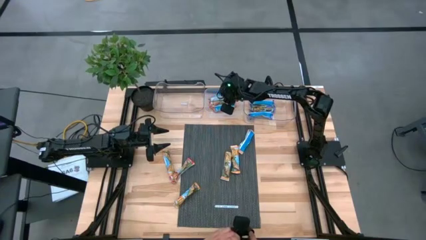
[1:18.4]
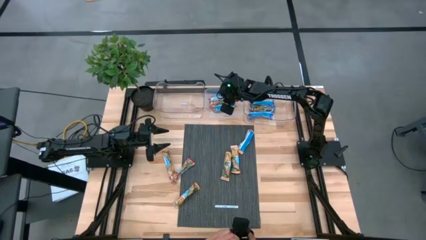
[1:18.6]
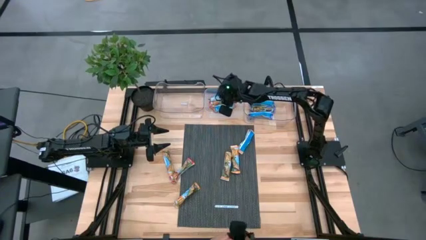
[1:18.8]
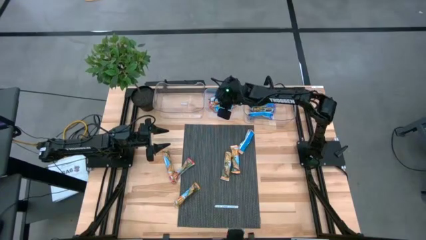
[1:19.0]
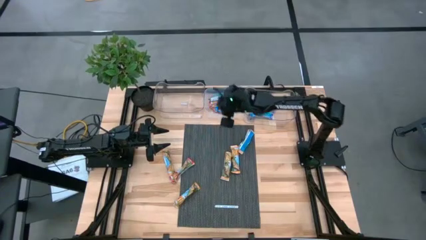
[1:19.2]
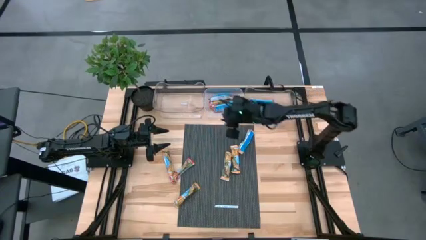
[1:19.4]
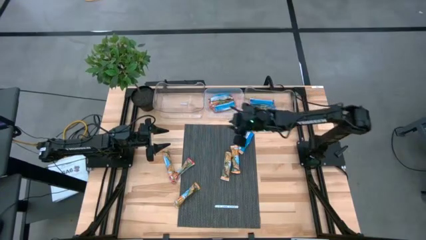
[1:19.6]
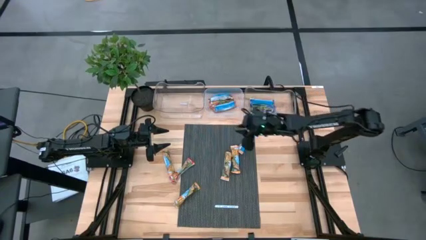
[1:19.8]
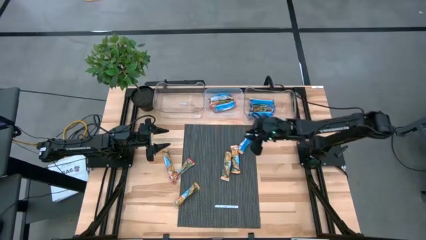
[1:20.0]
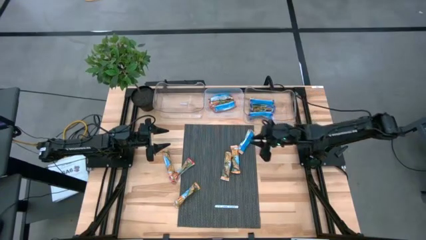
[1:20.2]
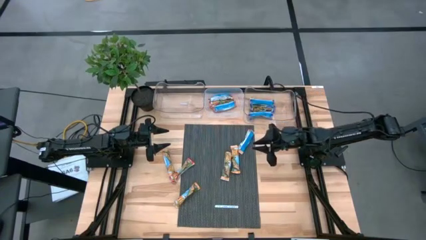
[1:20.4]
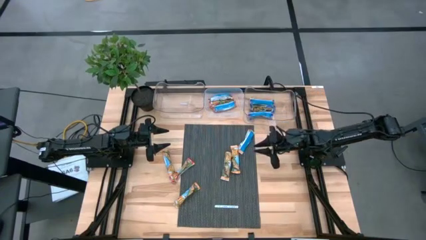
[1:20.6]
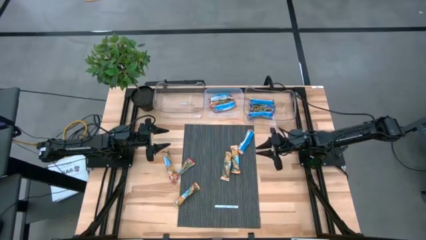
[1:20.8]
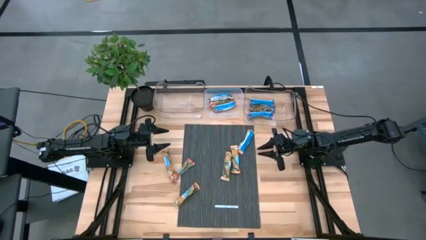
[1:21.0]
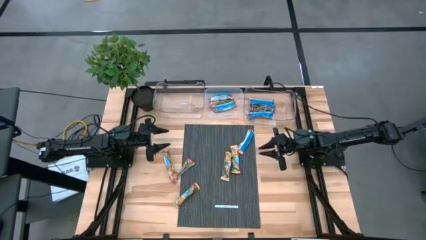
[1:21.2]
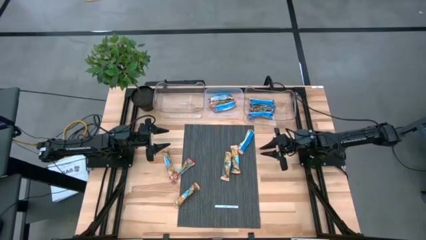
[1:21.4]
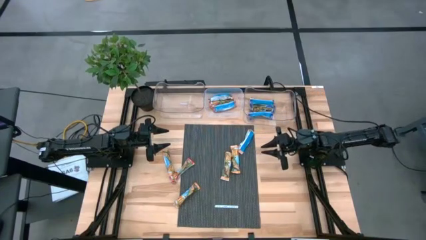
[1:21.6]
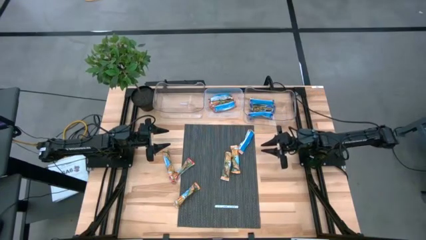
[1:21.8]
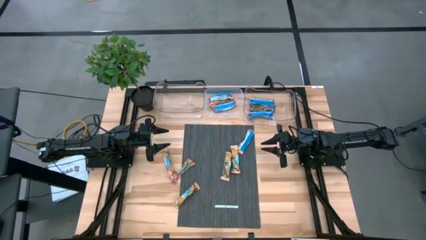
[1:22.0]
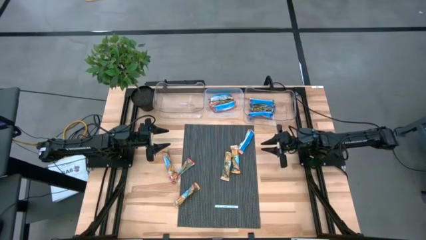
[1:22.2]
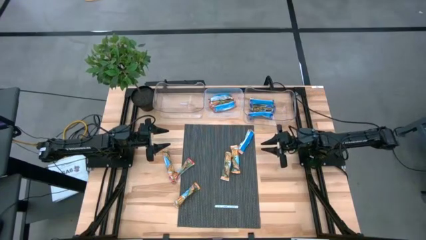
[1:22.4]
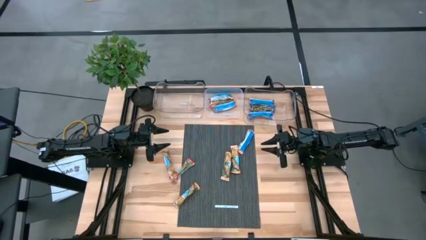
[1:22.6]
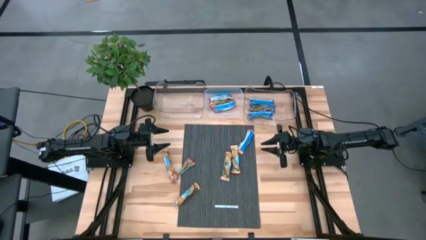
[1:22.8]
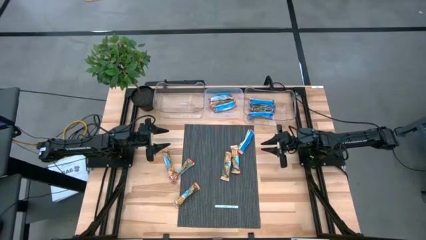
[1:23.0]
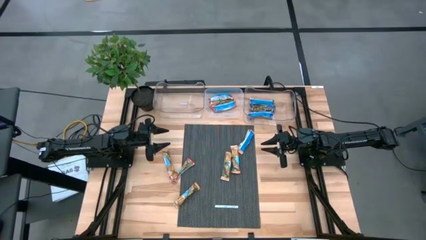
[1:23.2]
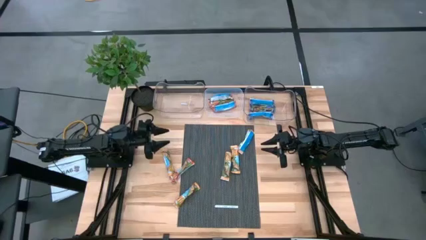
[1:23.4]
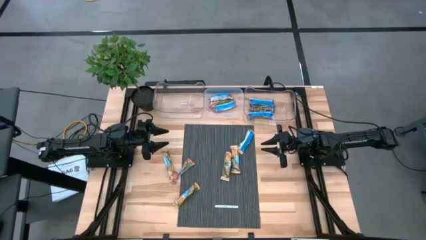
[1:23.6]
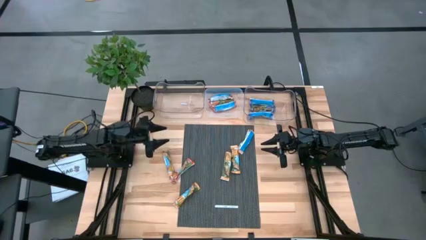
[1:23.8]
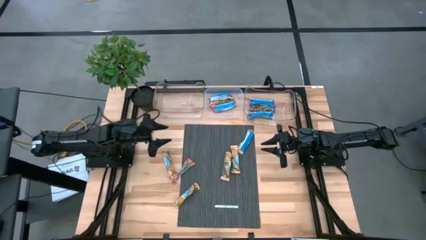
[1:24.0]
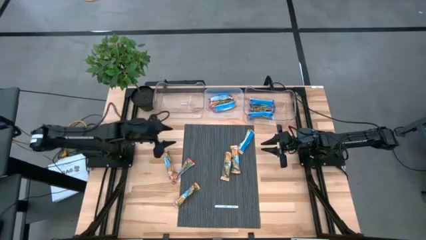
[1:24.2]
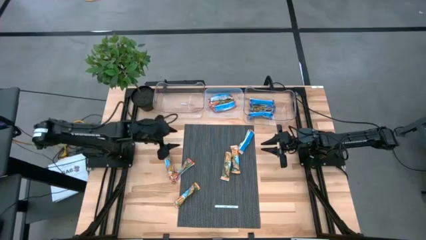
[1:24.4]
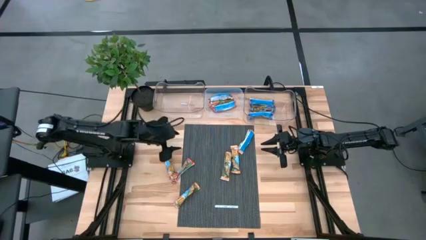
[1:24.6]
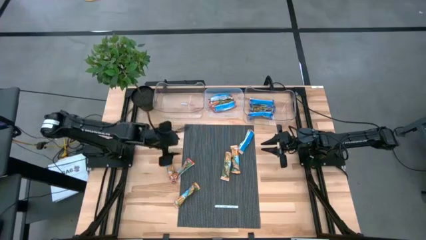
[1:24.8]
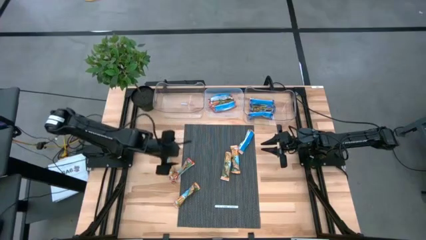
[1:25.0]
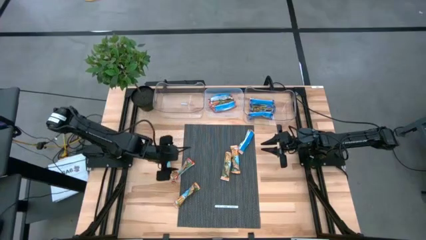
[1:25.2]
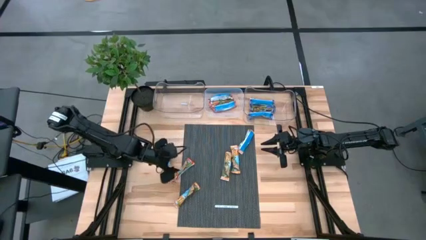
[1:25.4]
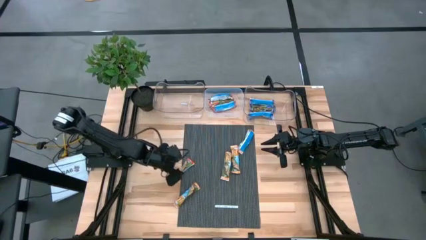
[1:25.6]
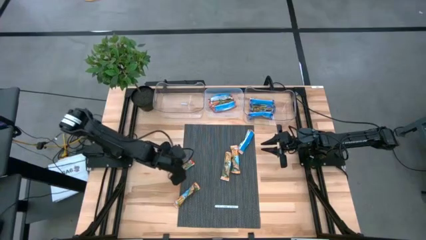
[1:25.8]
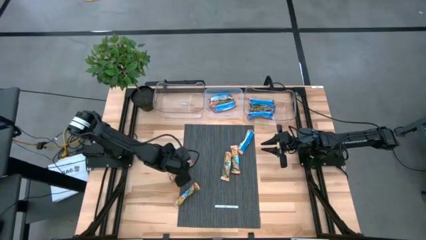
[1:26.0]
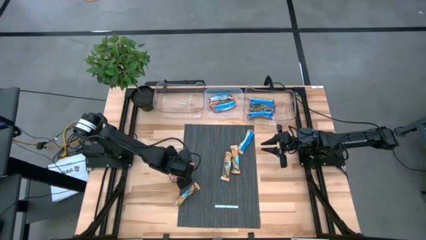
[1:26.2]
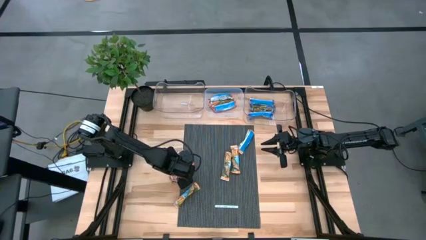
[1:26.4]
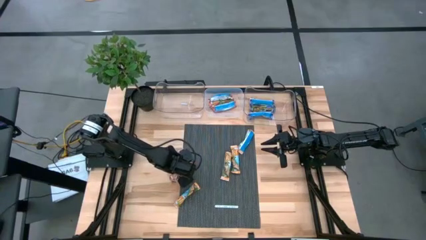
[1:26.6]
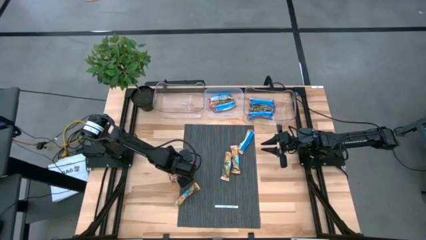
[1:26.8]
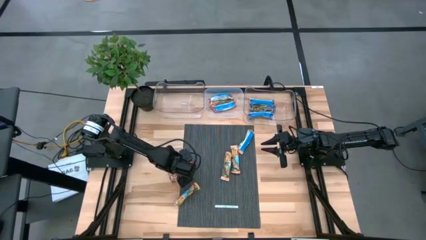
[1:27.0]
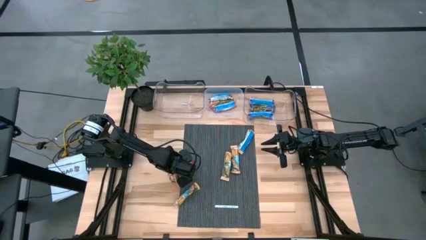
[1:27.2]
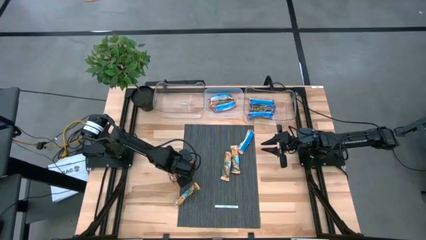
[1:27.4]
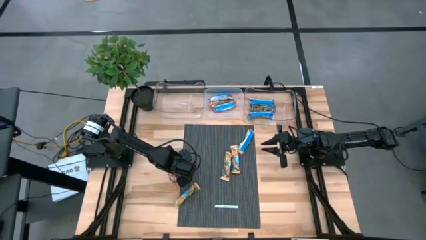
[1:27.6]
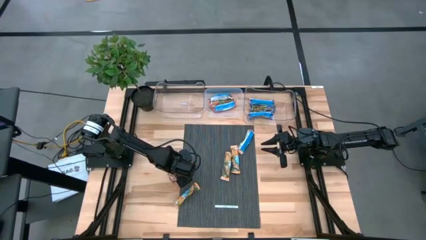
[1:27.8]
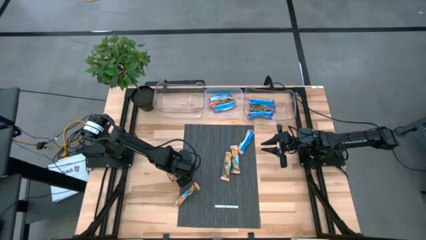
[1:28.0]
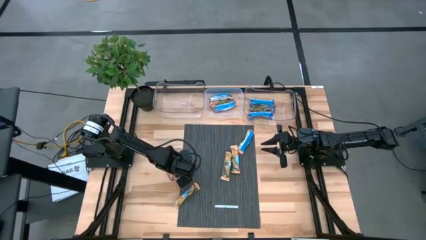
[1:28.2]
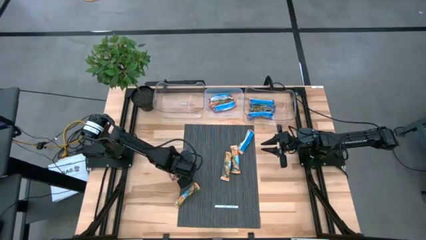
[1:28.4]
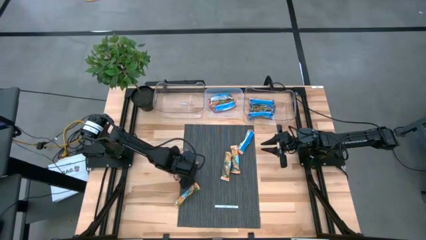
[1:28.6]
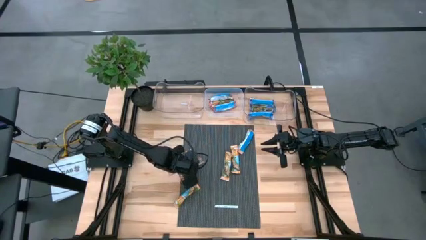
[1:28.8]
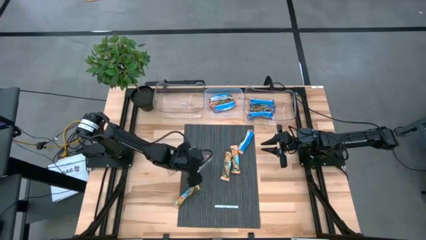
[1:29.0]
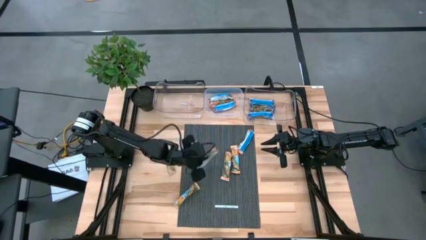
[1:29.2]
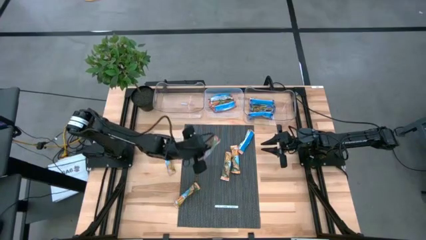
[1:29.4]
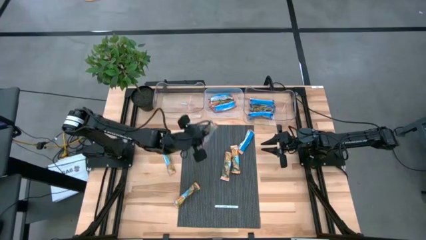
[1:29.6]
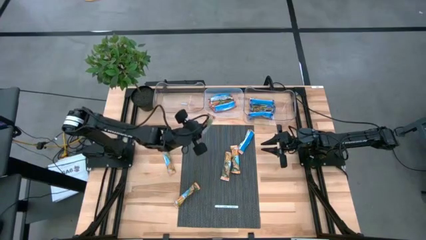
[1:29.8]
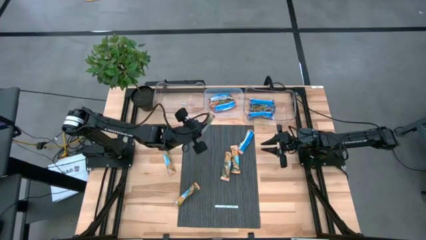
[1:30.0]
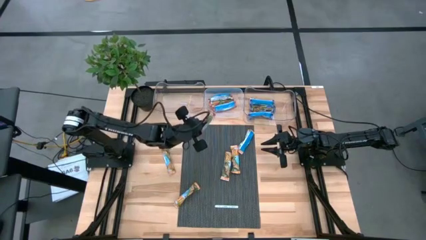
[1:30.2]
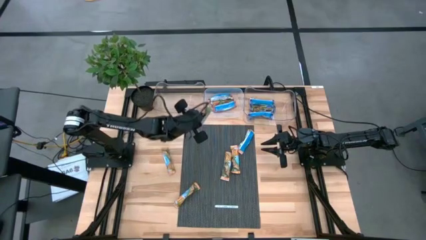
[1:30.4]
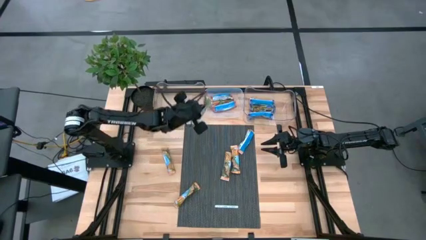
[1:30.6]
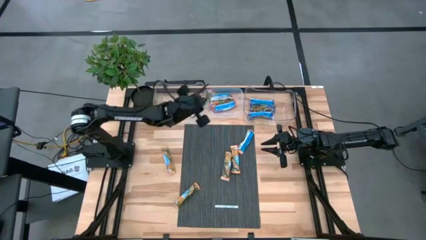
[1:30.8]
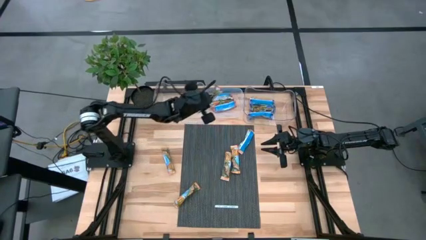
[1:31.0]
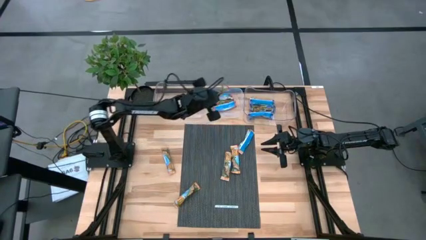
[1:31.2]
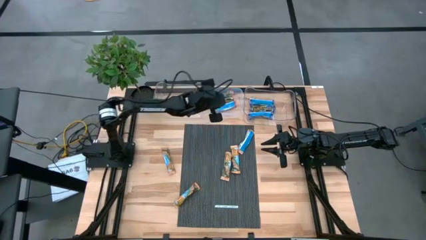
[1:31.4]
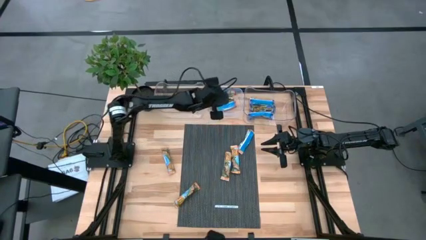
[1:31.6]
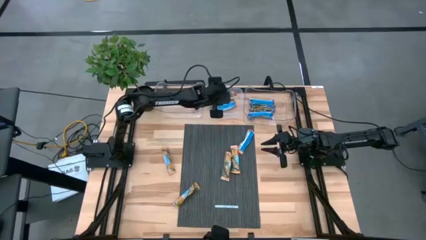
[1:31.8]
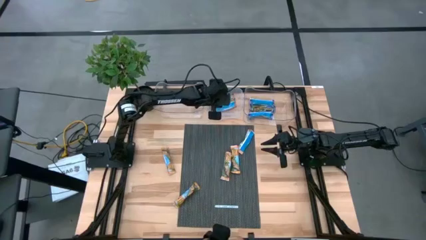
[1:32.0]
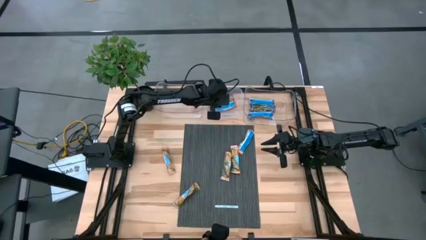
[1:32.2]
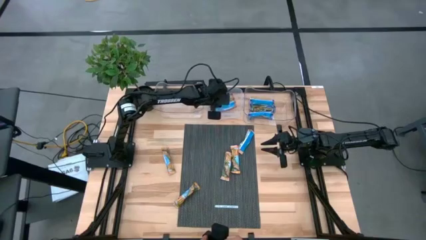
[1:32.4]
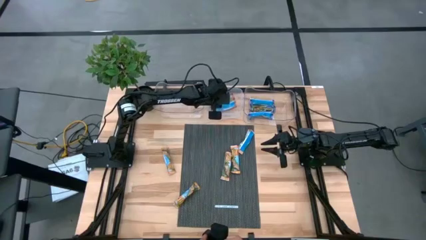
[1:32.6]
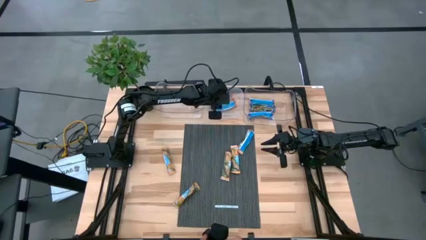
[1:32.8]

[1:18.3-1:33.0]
Task: Pick and place Granola Bars by type
Put the red granola bar into the white bin

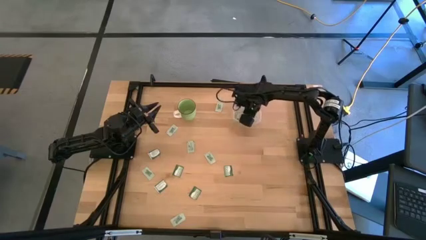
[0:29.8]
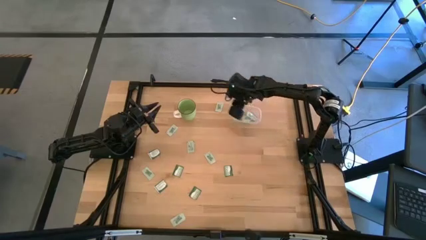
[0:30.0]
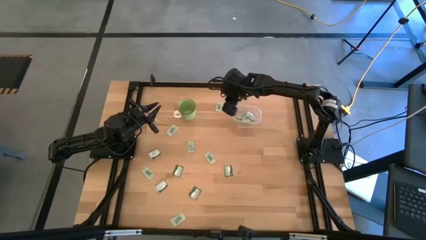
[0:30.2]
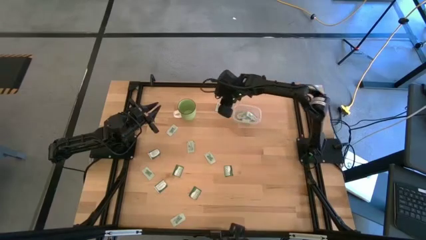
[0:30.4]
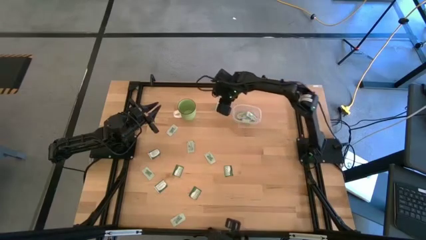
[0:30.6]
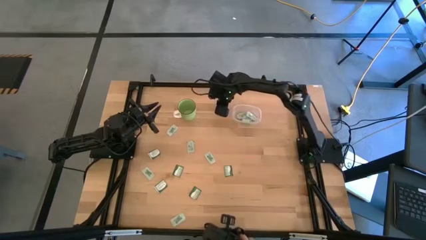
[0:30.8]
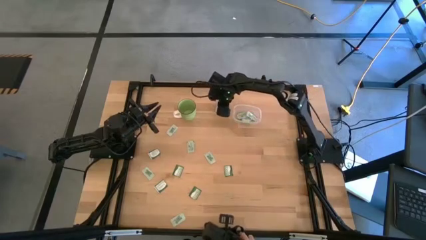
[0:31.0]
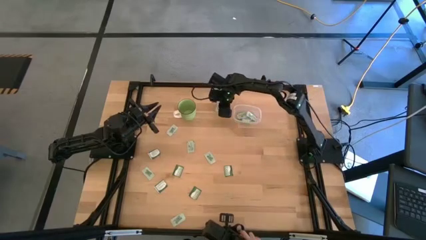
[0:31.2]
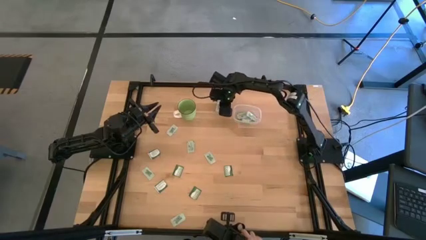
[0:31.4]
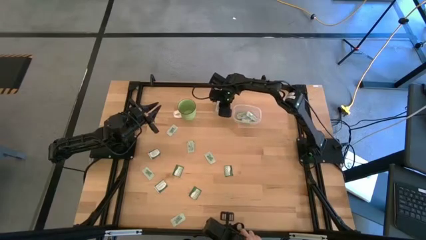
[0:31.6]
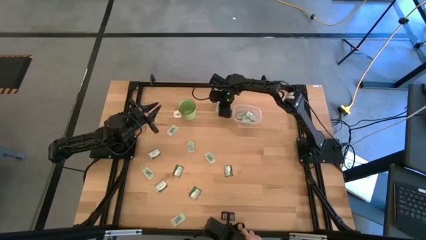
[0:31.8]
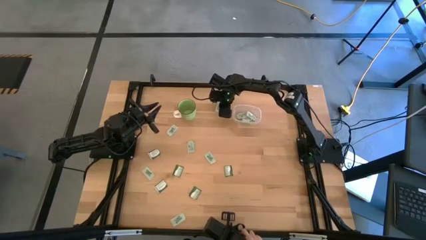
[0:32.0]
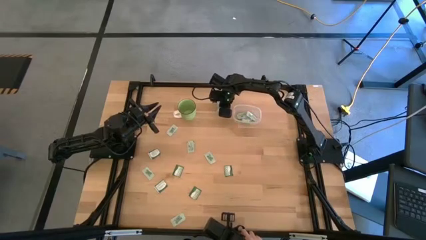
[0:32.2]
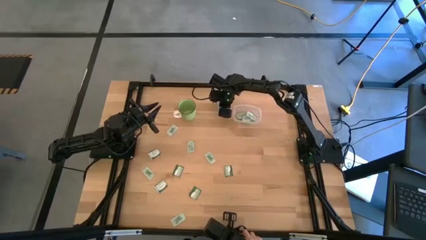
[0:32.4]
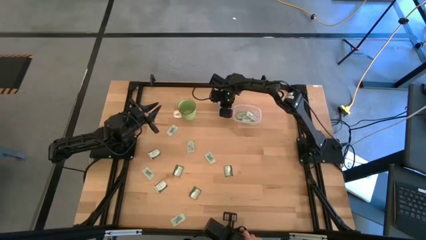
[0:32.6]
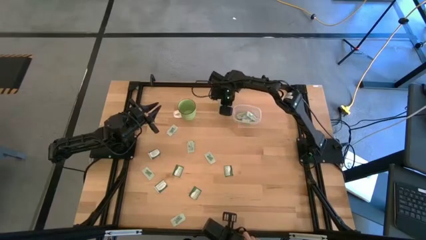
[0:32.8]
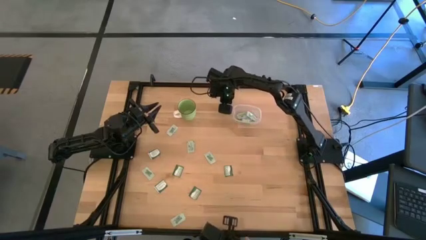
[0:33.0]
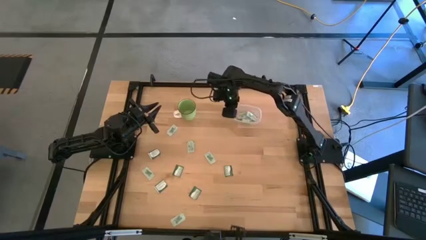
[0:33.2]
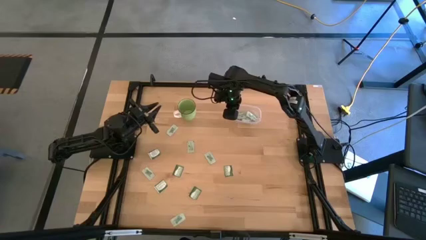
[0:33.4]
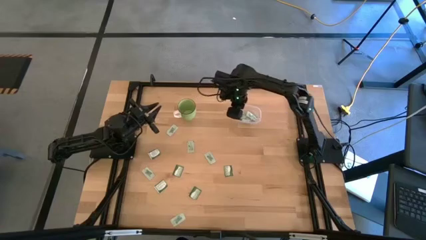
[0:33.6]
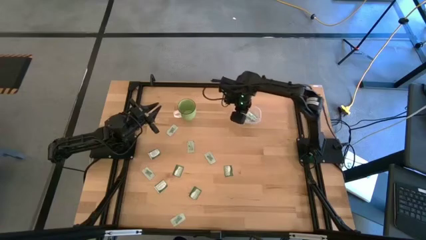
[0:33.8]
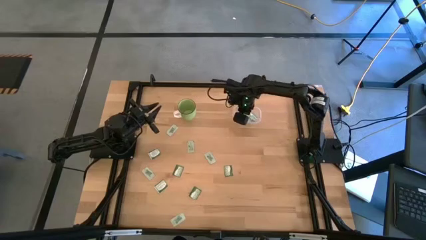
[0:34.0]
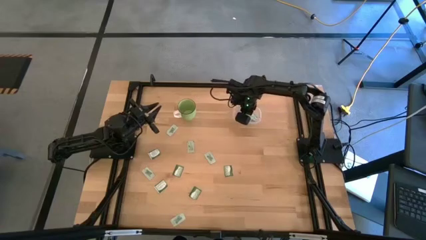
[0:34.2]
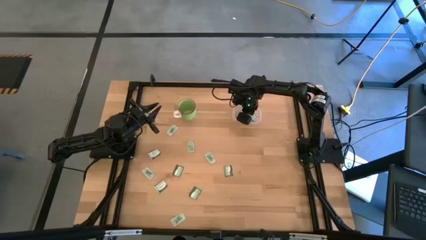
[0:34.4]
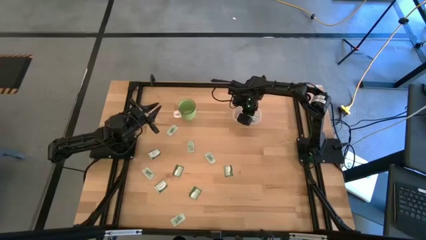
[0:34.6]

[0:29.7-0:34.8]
Task: Pick and place items into bin
Put the white stevia packet into the transparent bin
